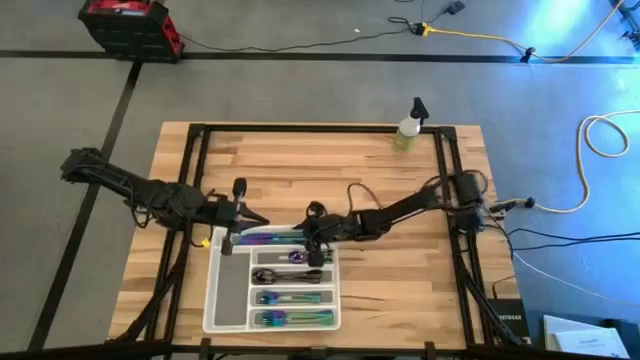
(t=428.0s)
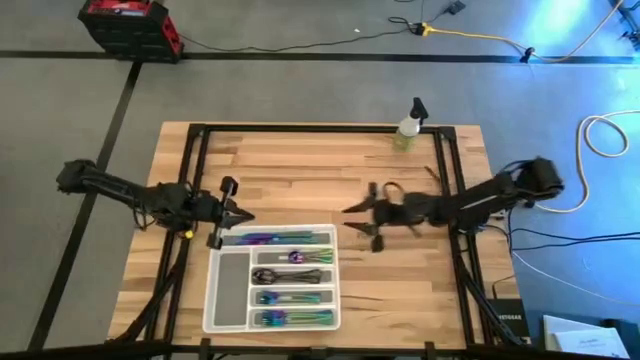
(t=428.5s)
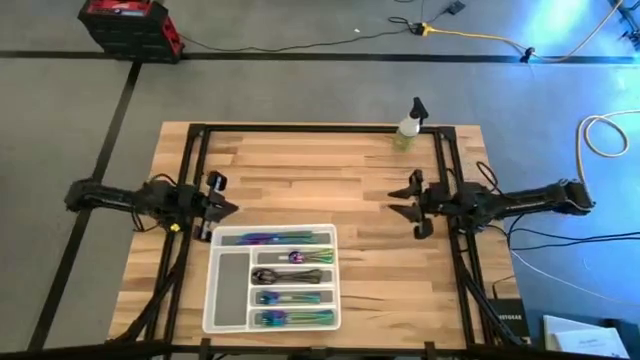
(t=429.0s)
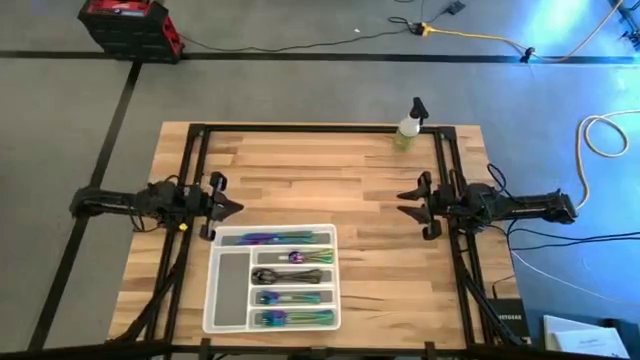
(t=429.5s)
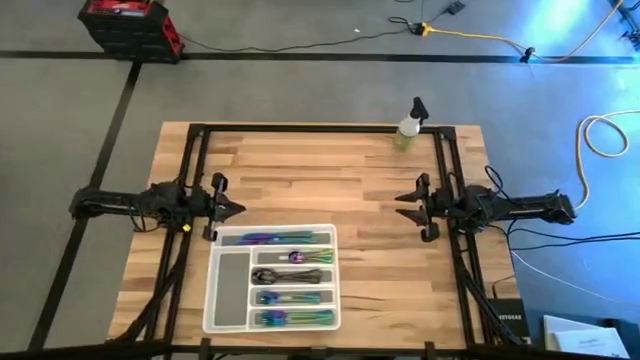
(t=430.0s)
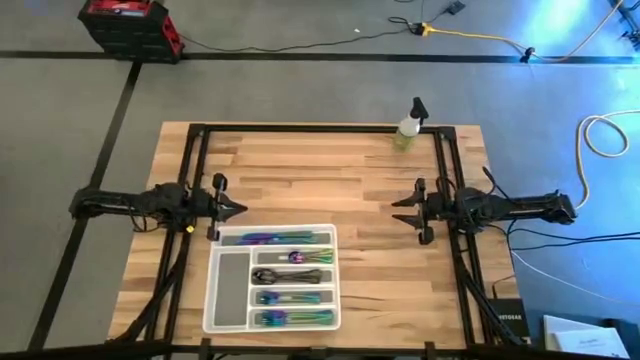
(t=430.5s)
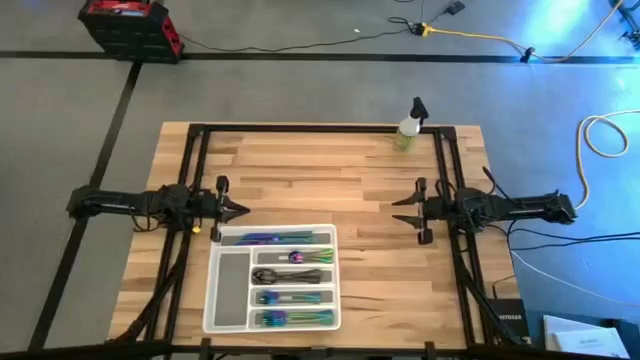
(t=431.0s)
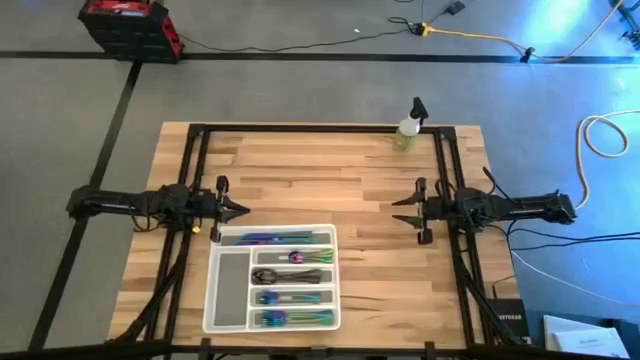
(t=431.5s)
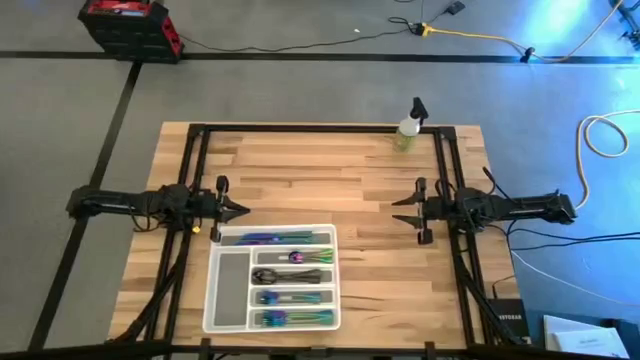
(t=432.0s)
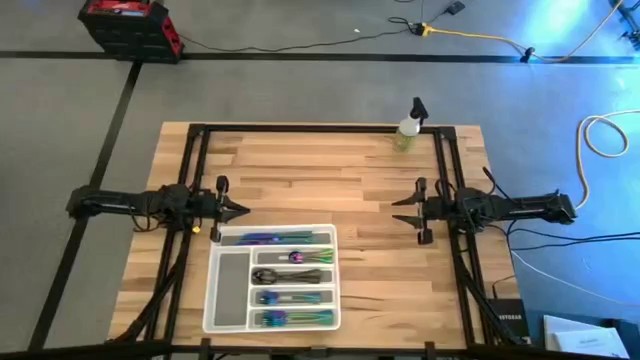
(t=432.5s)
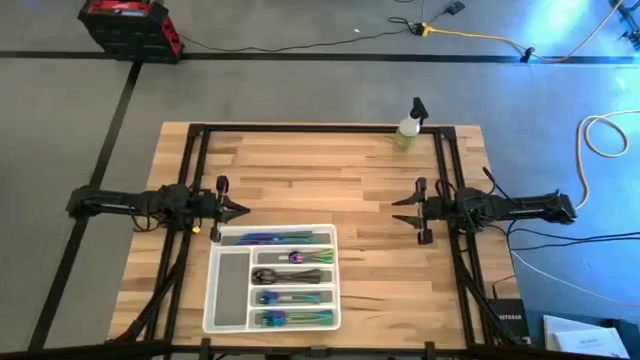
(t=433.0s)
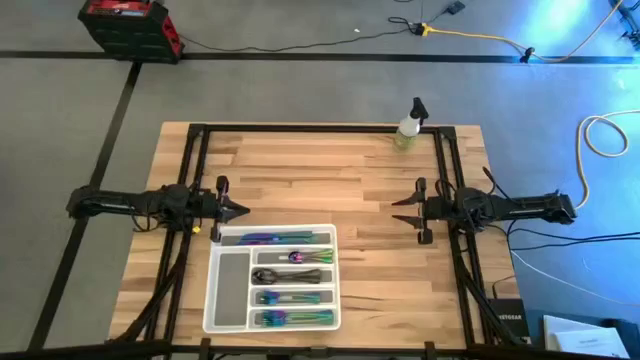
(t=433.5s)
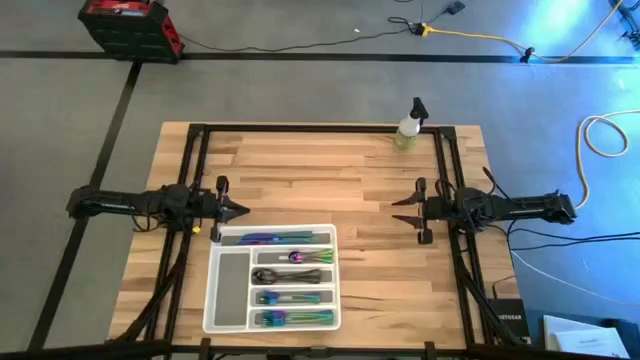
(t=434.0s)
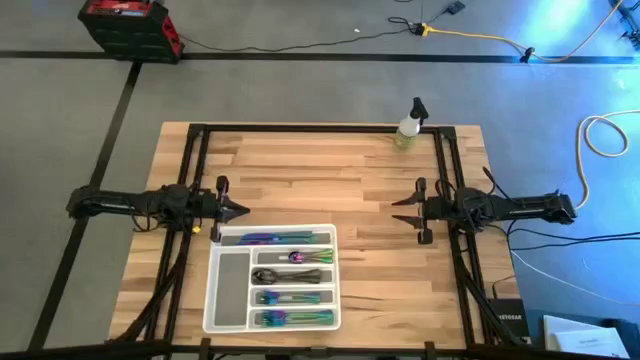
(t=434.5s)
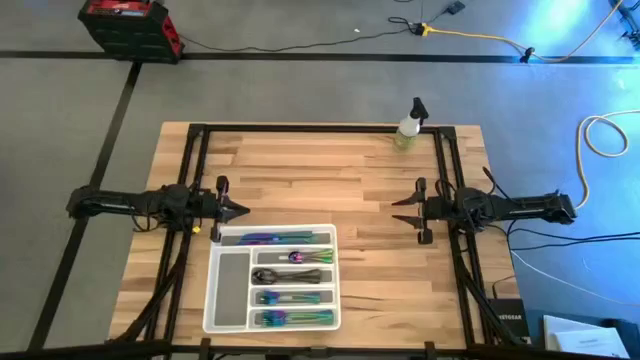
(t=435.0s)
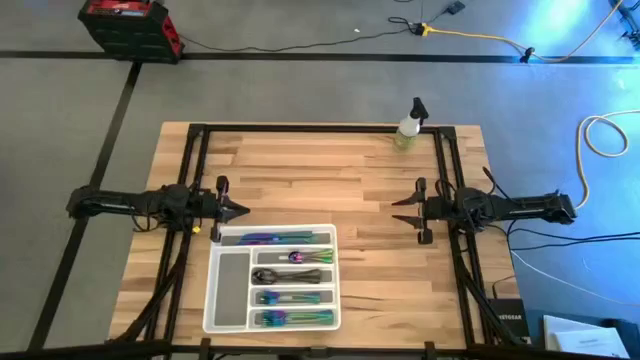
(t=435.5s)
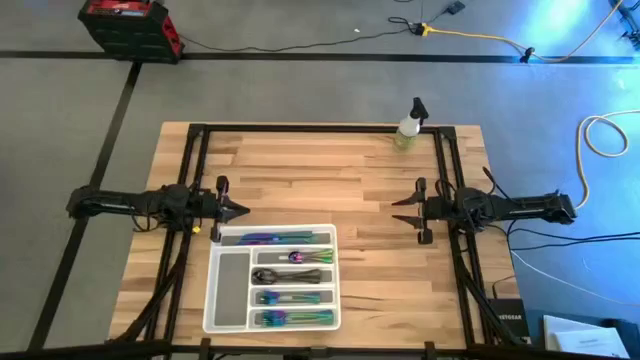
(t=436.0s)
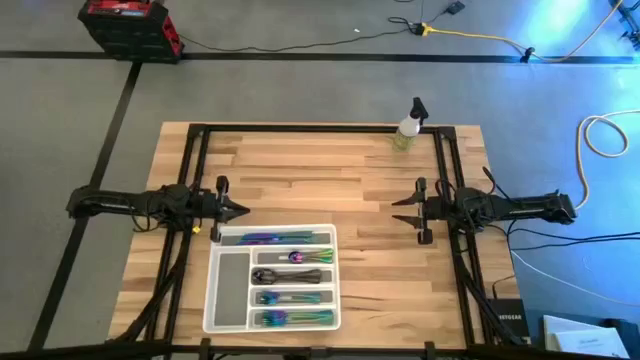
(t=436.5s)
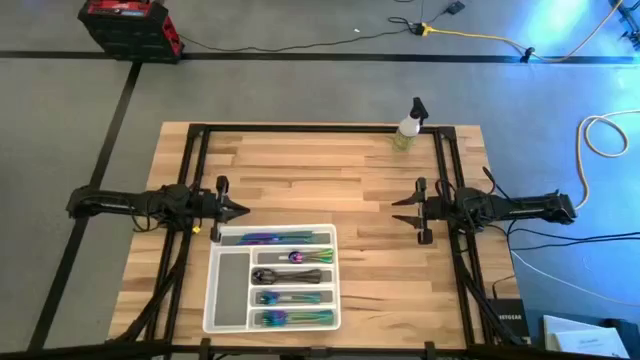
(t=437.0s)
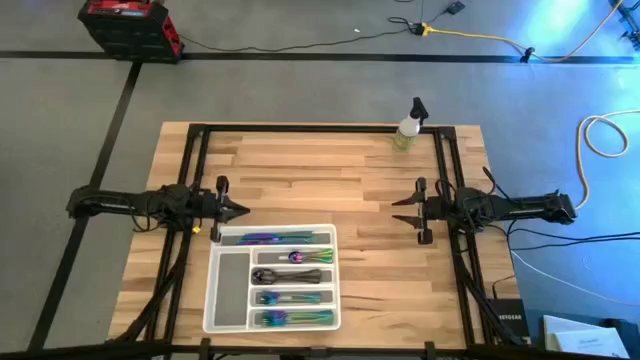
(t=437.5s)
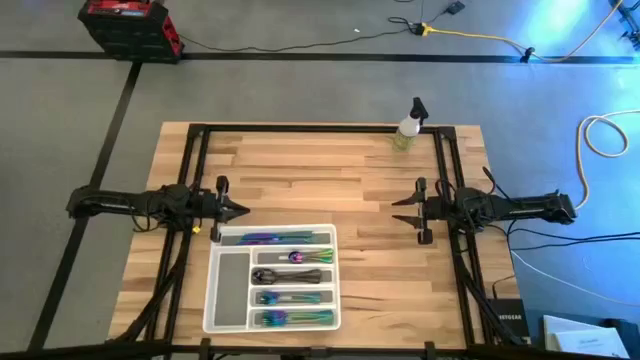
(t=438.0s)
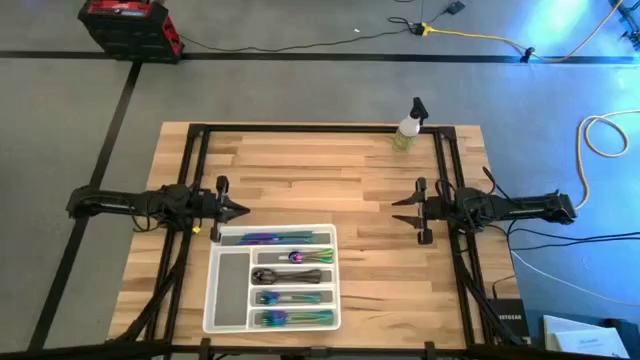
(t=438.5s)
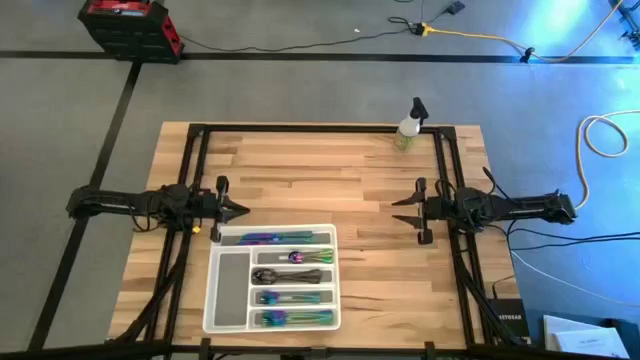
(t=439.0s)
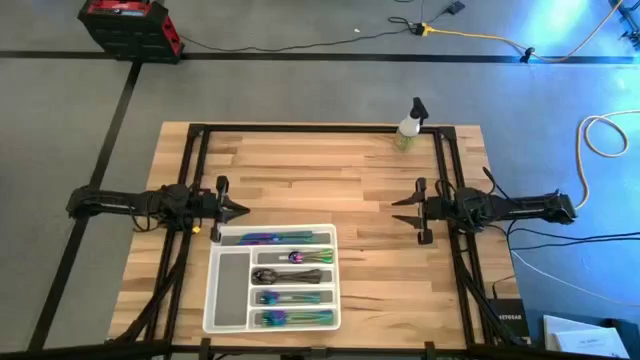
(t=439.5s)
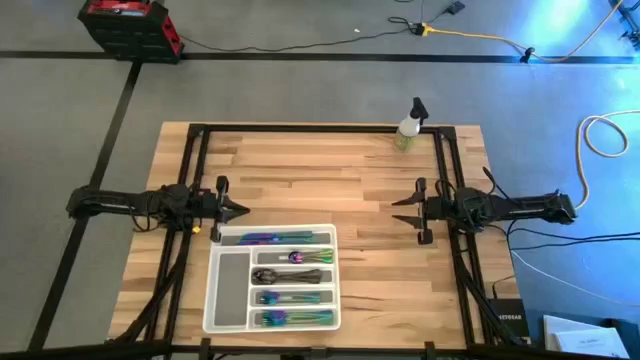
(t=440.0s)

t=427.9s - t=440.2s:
Task: Sort silverware
Return to Home Position

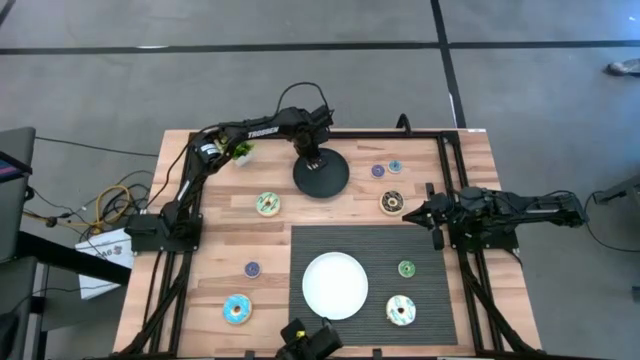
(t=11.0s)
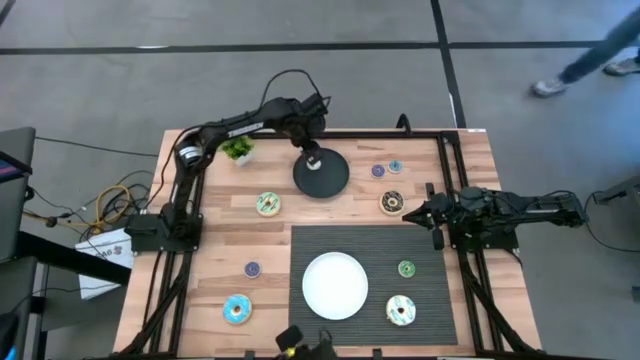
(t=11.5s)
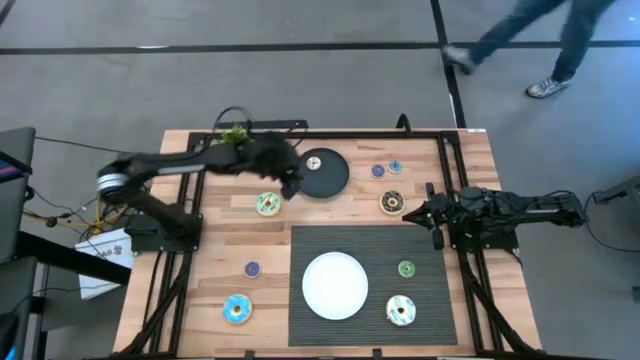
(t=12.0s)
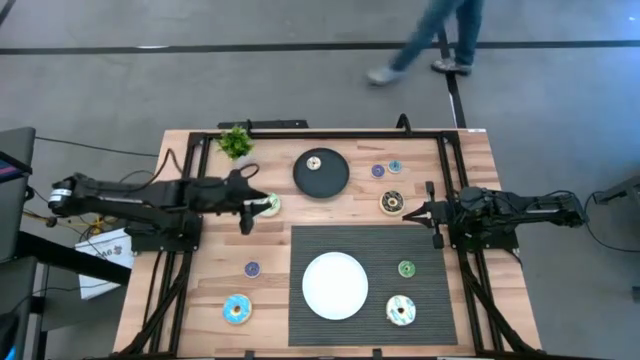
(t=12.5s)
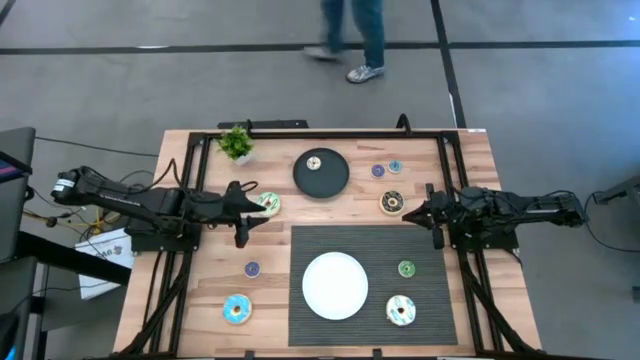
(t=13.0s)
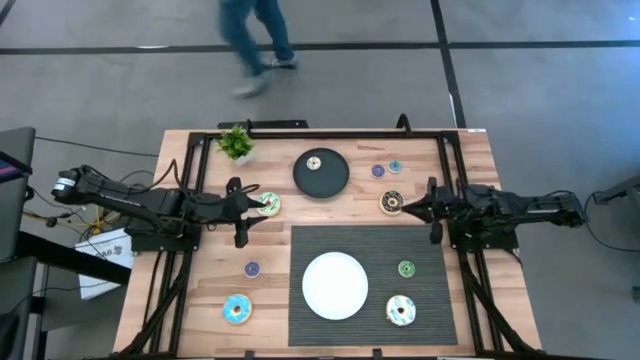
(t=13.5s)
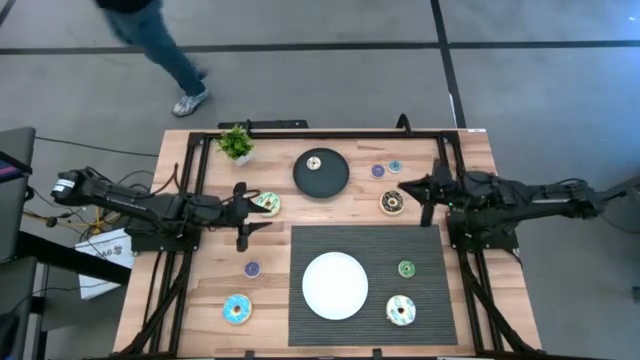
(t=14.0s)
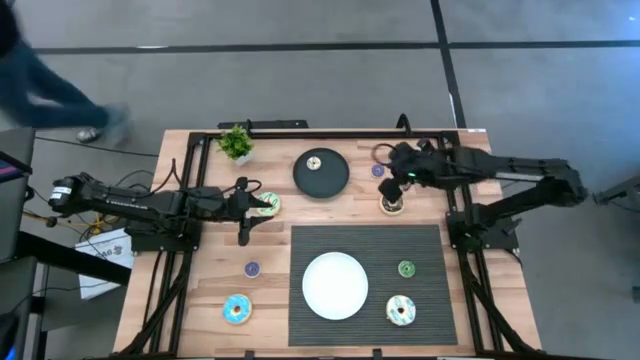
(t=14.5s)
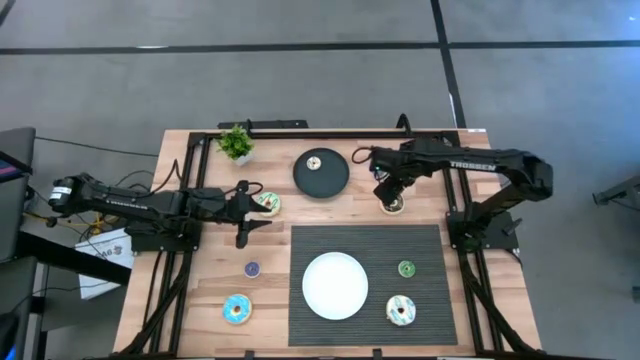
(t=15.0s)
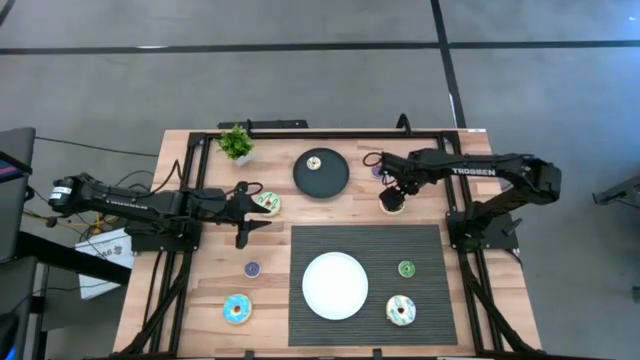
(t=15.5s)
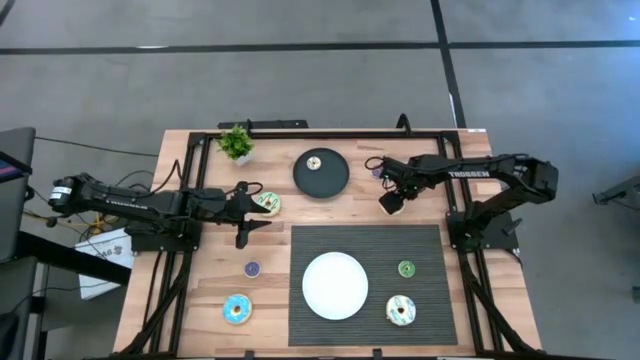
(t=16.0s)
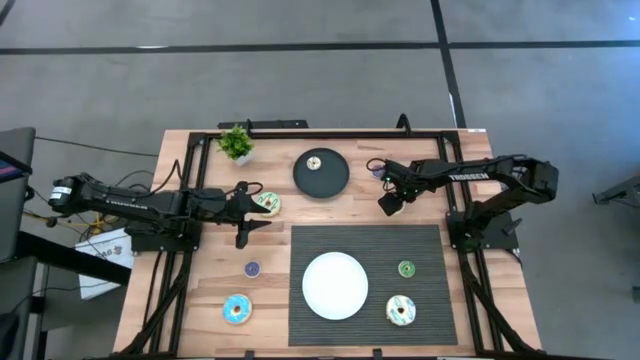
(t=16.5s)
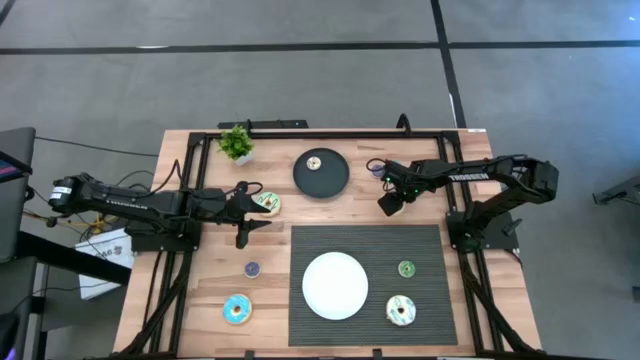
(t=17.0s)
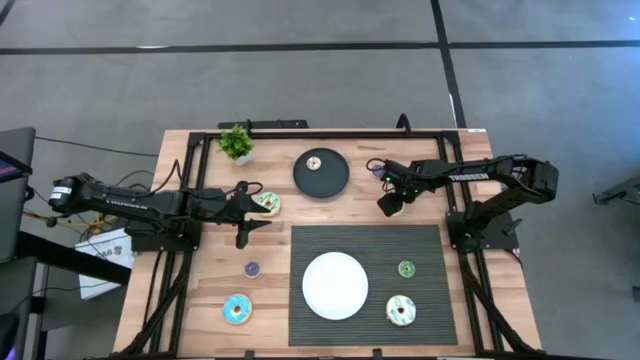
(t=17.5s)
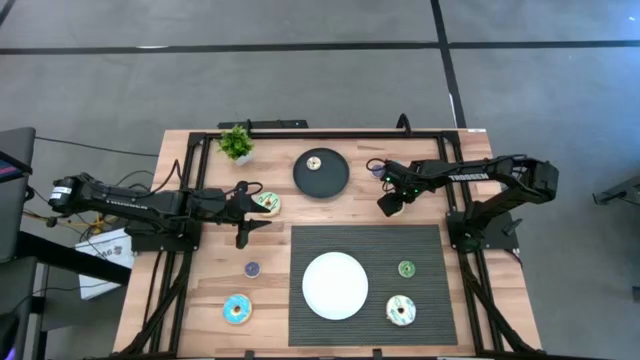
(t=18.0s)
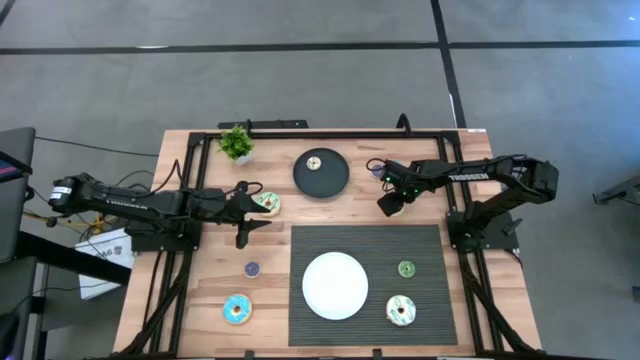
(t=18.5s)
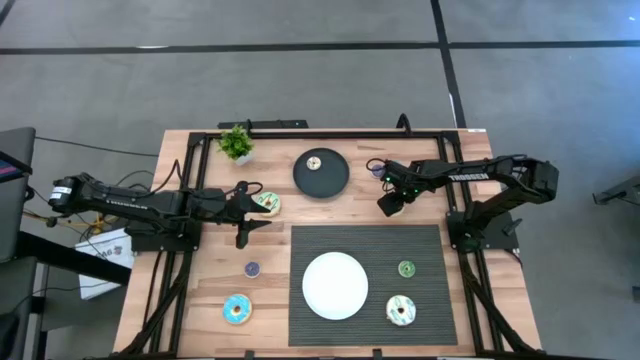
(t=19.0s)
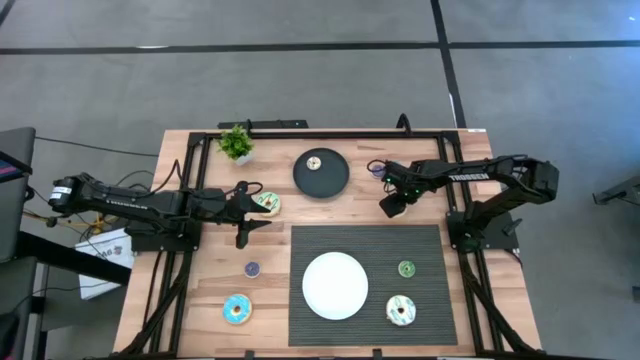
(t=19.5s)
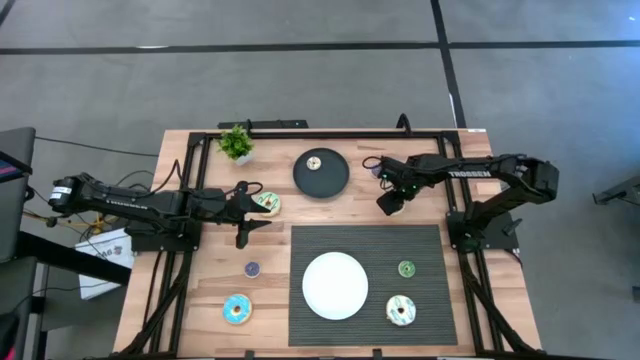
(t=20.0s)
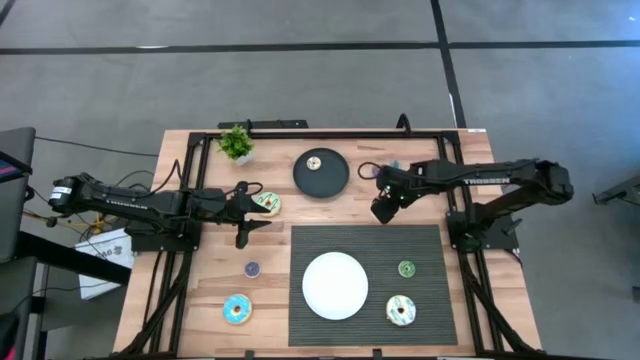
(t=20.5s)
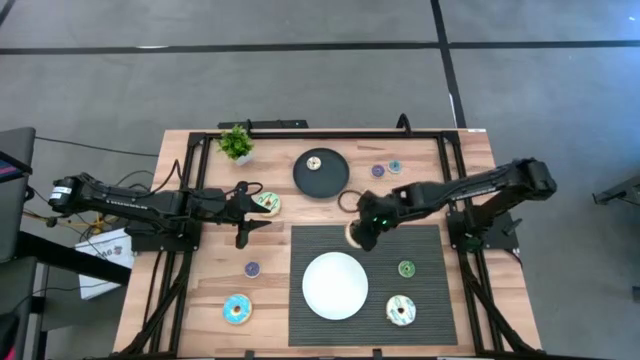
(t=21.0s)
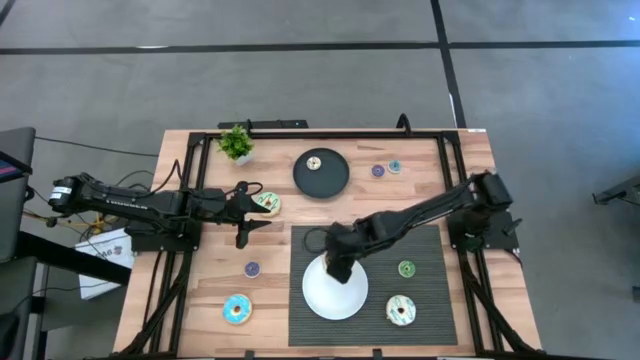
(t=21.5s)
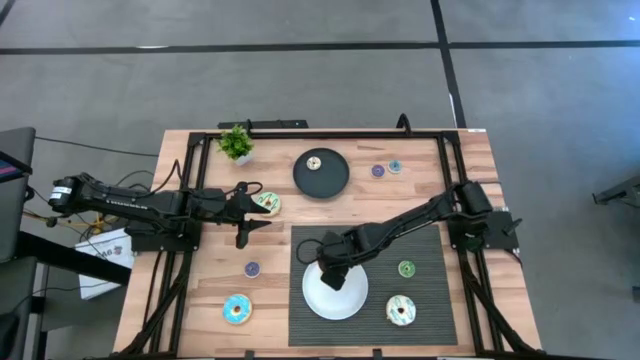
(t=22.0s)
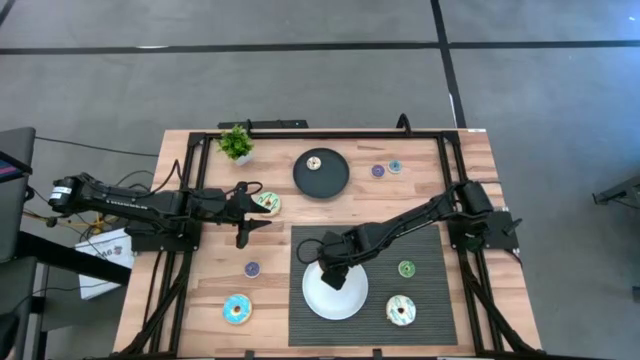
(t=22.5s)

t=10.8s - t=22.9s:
Task: Pick & Place donuts
Put the large black donut on the white plate
